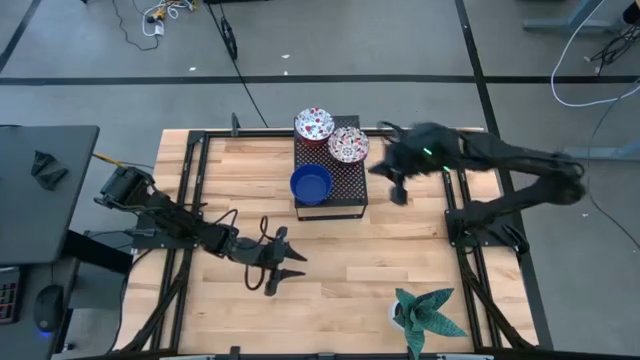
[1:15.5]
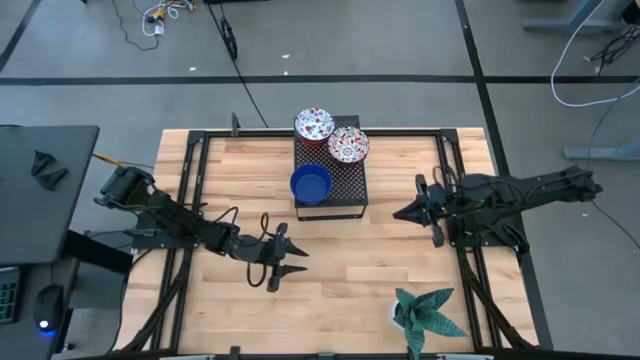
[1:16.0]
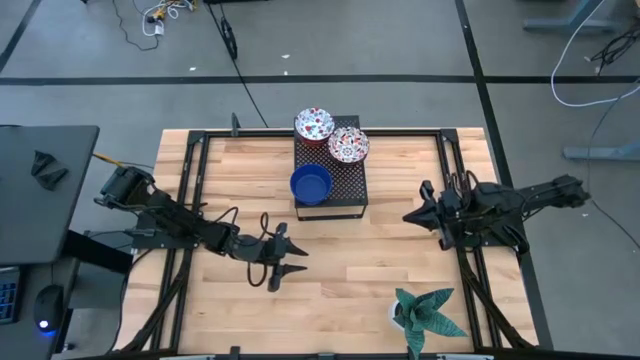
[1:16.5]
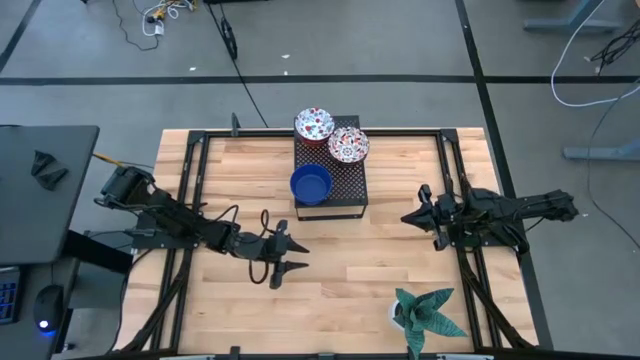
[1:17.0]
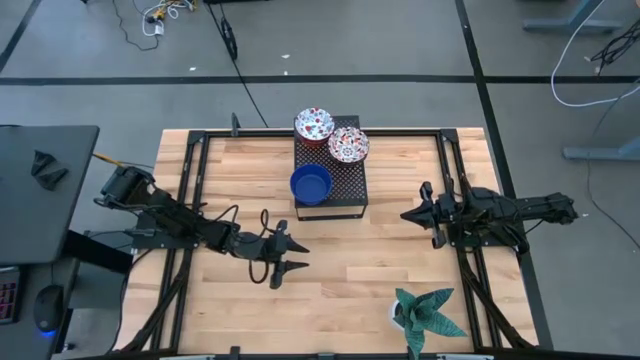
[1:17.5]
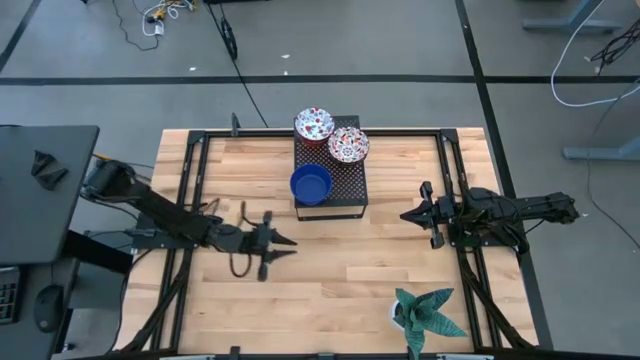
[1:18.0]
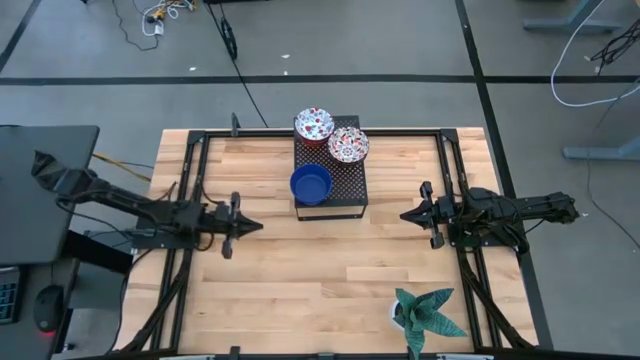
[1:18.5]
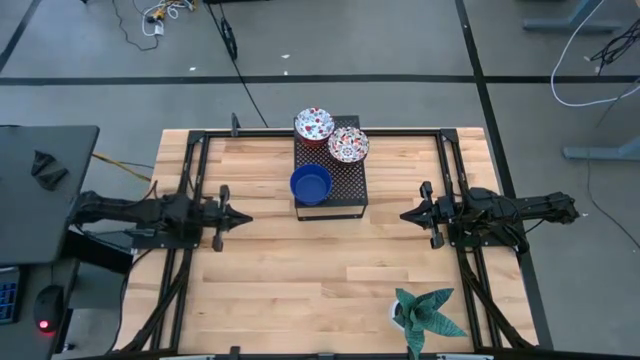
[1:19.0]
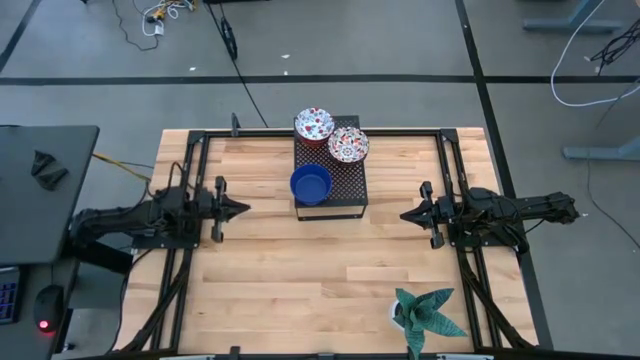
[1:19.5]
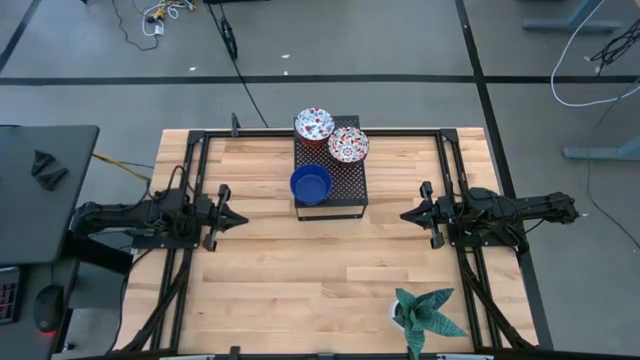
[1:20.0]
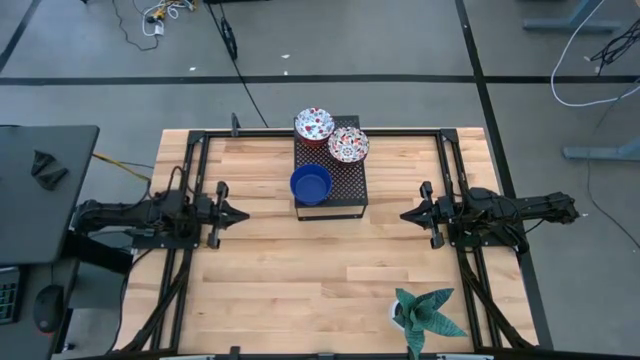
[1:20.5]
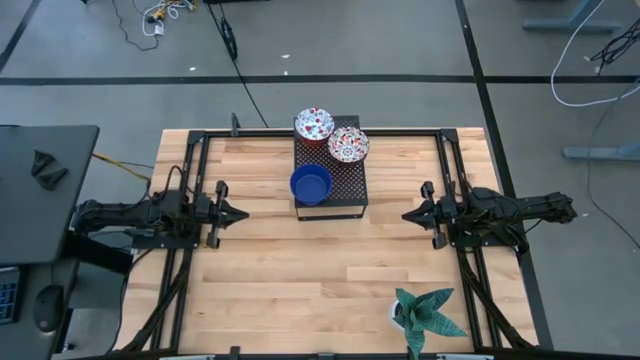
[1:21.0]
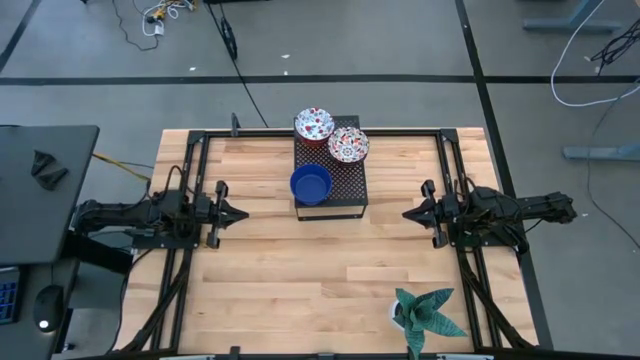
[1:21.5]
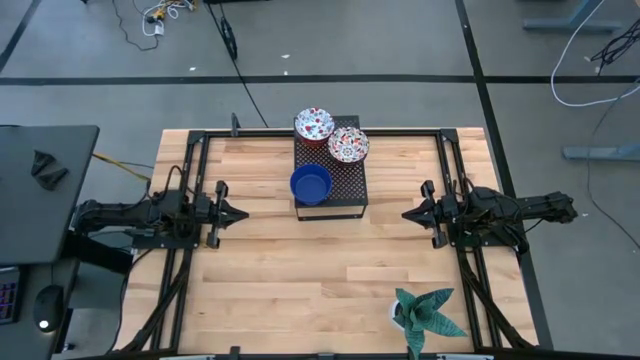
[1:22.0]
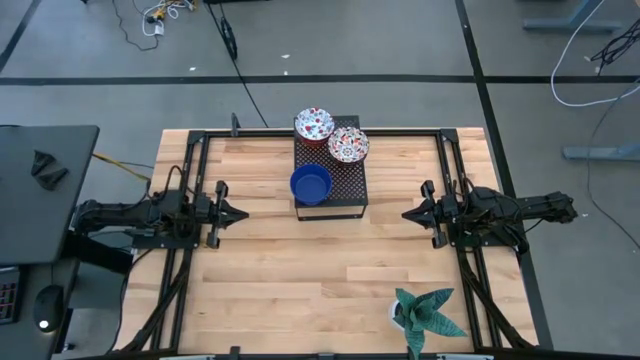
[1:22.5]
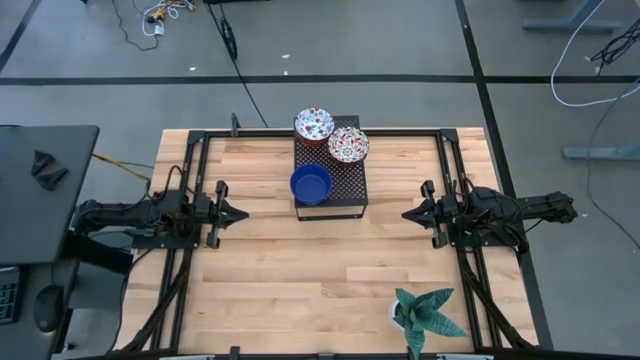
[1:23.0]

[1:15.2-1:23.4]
Task: Pick & Place Mini bowls
Return to Home Position

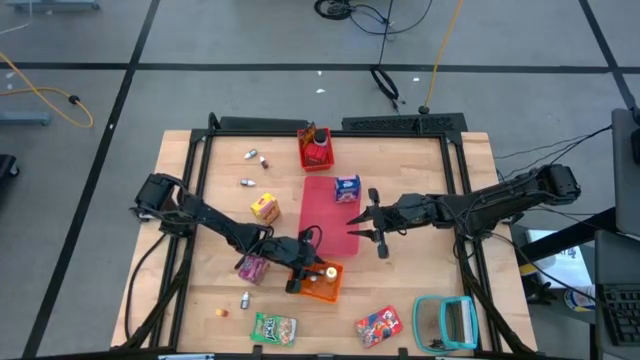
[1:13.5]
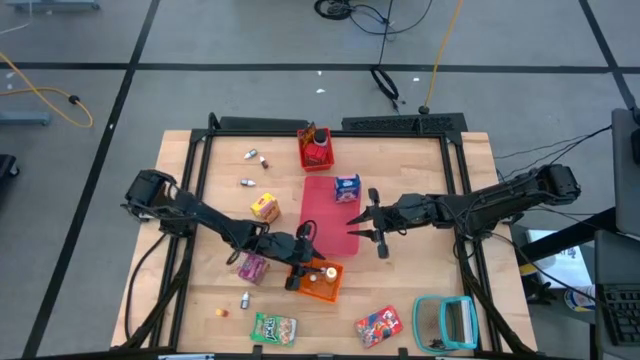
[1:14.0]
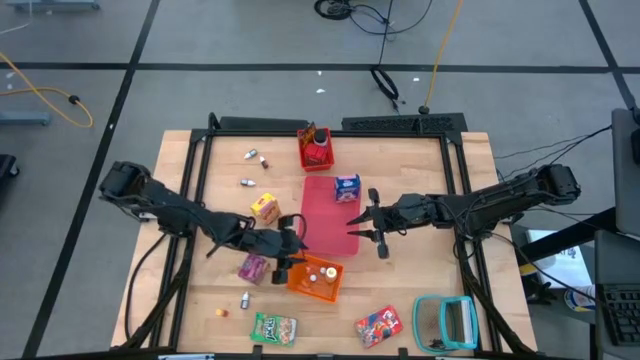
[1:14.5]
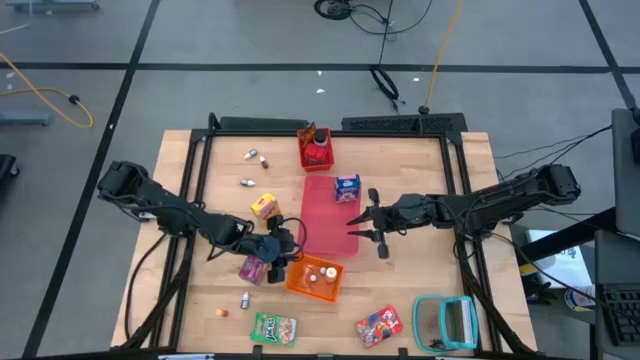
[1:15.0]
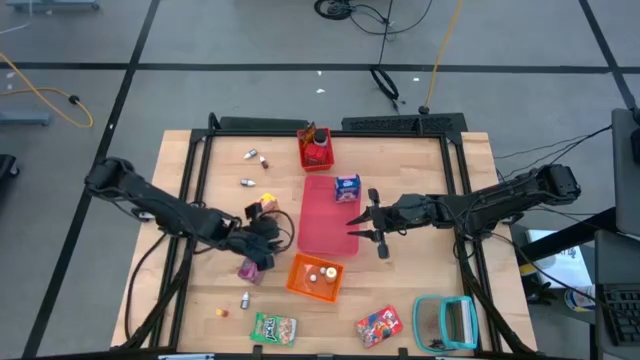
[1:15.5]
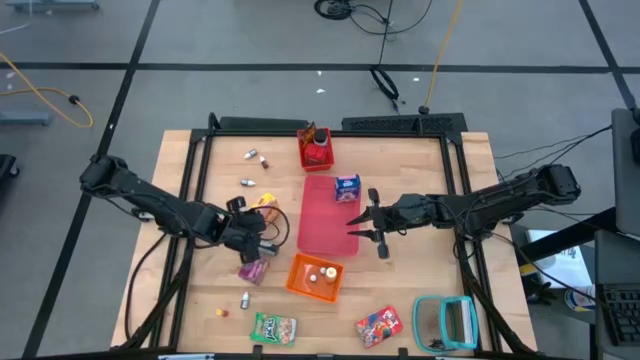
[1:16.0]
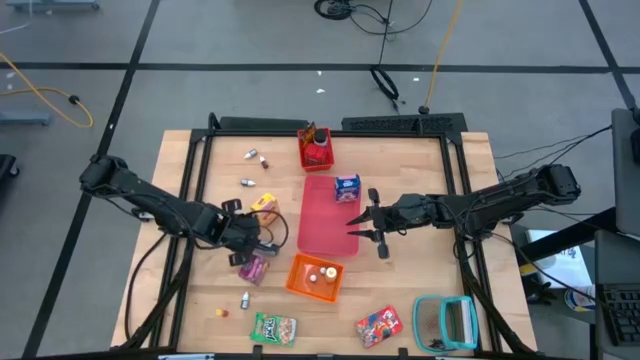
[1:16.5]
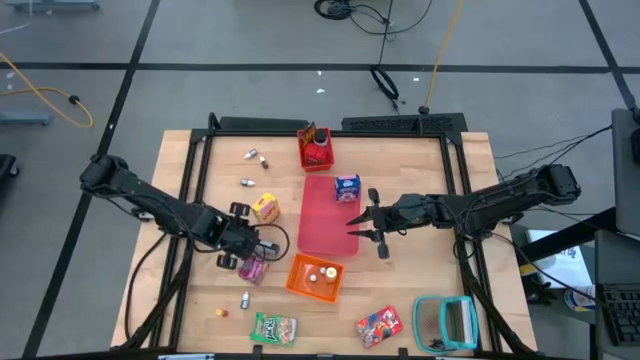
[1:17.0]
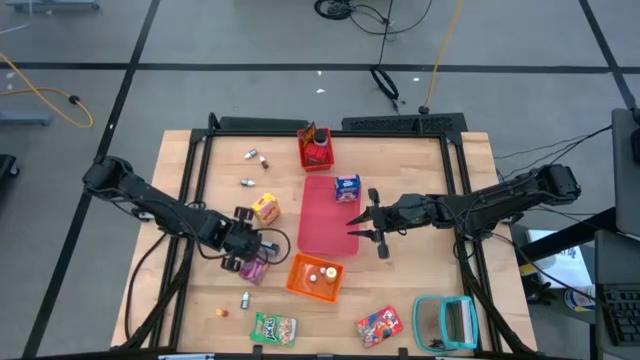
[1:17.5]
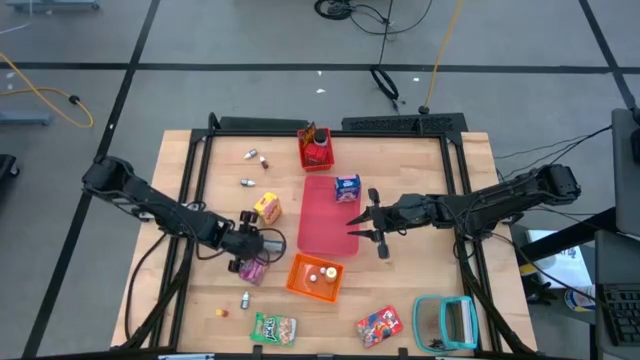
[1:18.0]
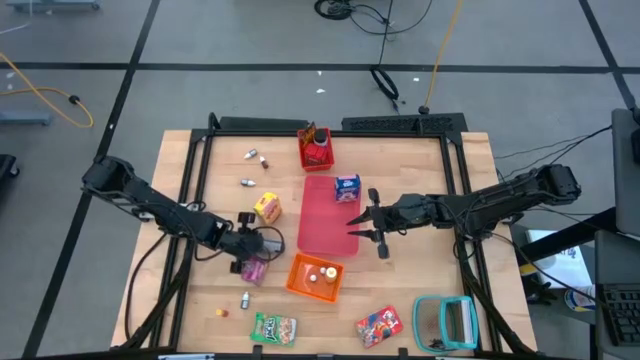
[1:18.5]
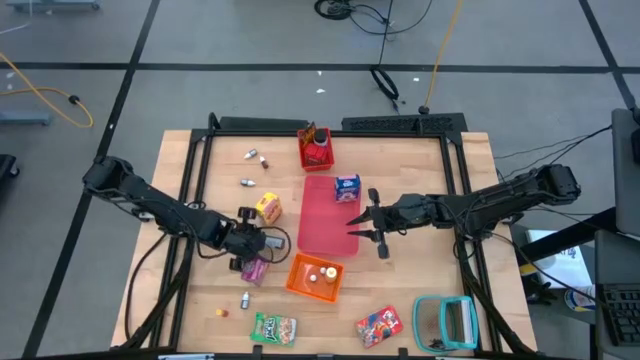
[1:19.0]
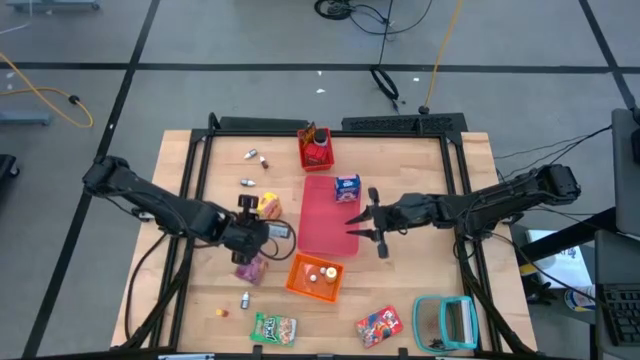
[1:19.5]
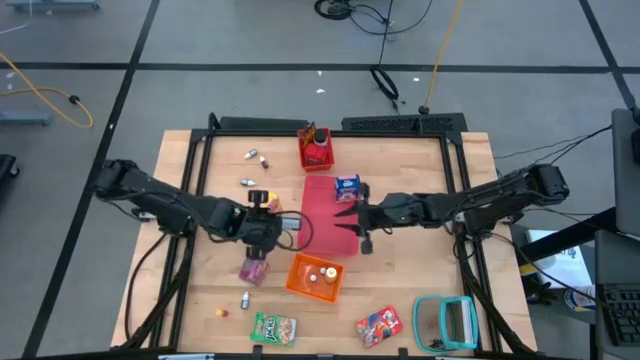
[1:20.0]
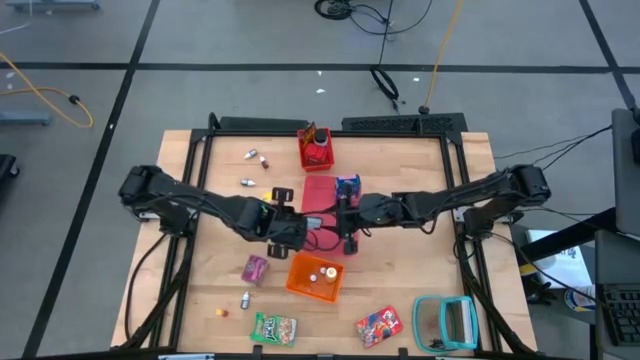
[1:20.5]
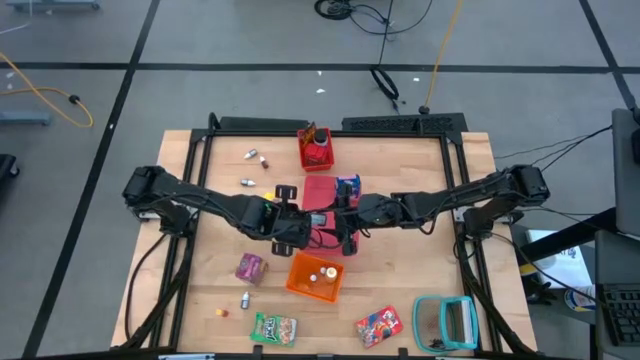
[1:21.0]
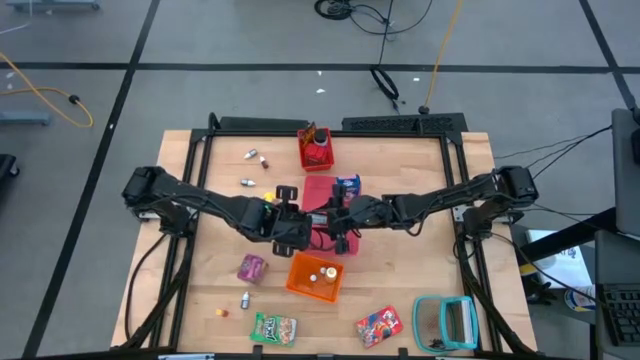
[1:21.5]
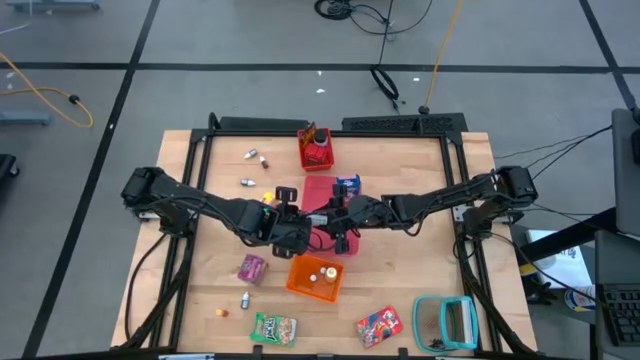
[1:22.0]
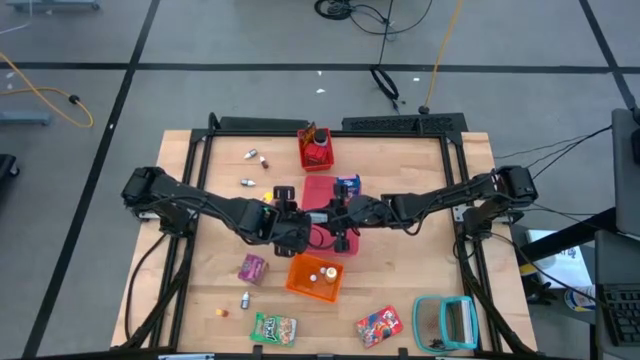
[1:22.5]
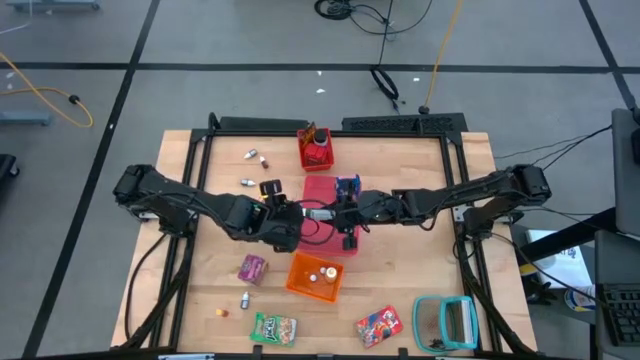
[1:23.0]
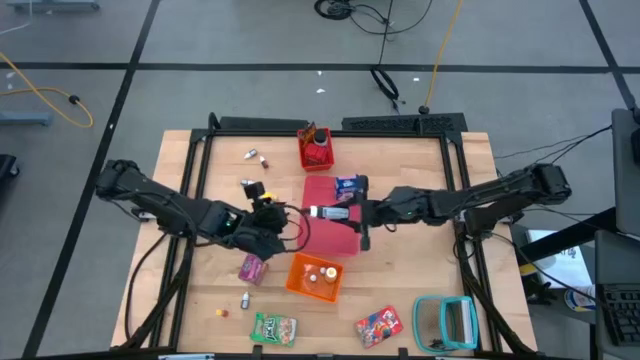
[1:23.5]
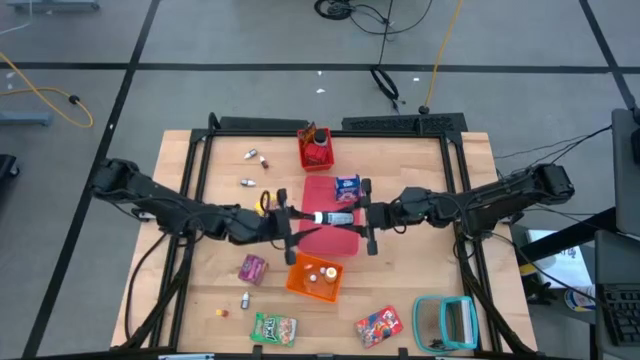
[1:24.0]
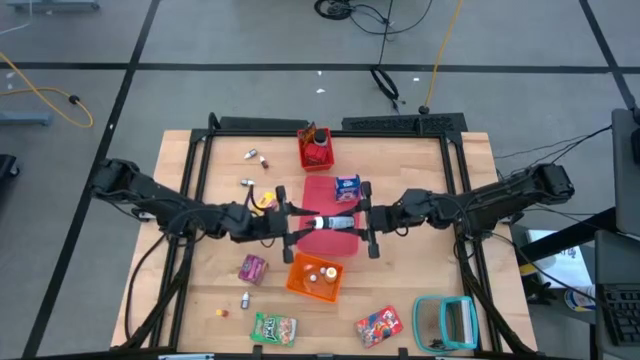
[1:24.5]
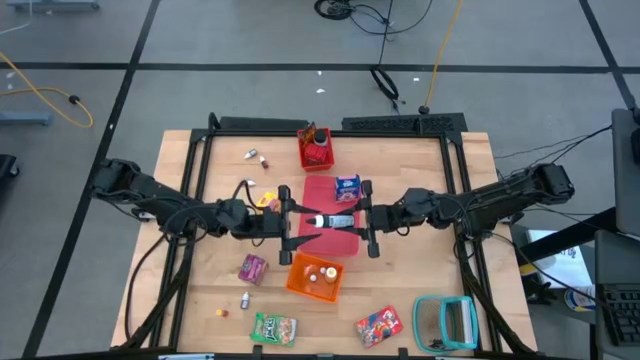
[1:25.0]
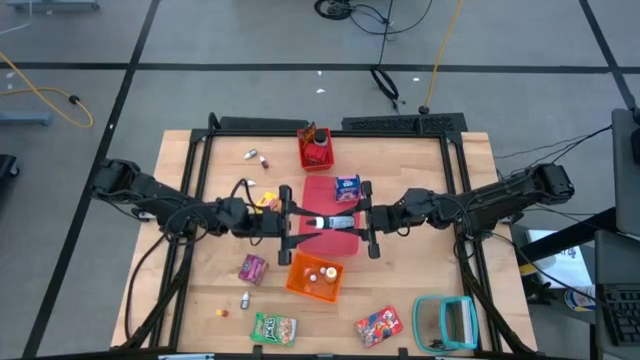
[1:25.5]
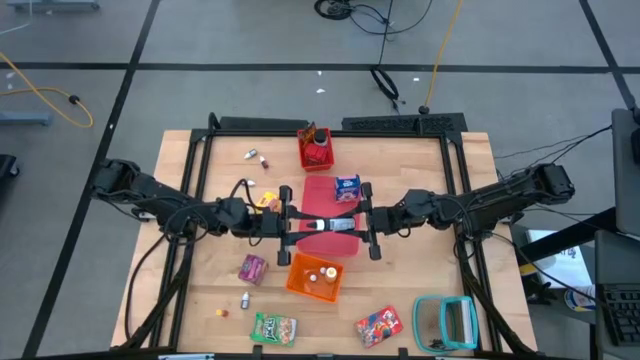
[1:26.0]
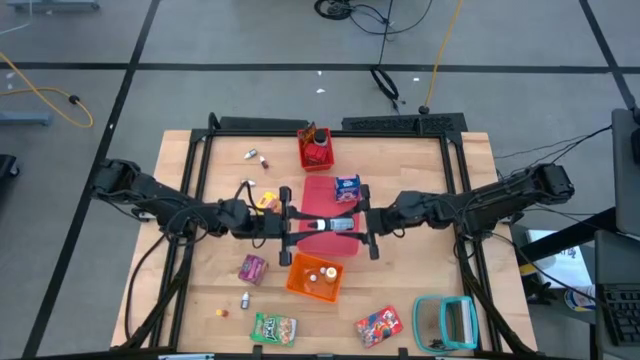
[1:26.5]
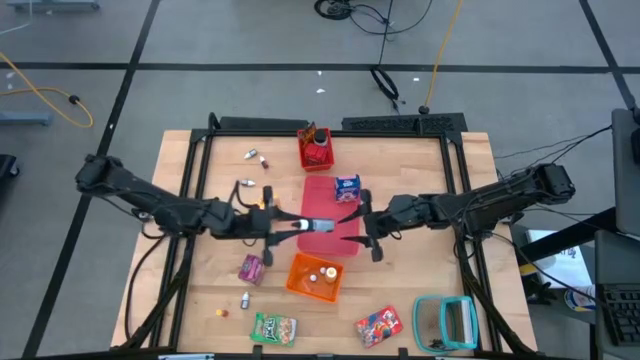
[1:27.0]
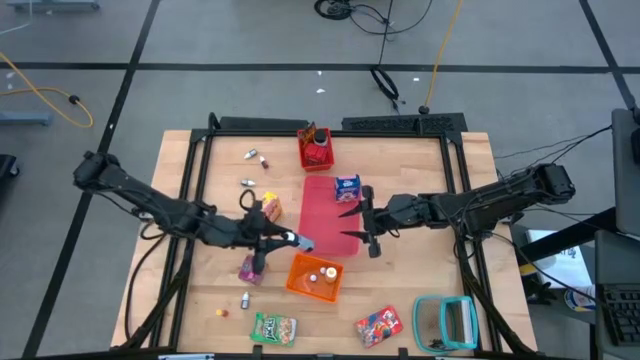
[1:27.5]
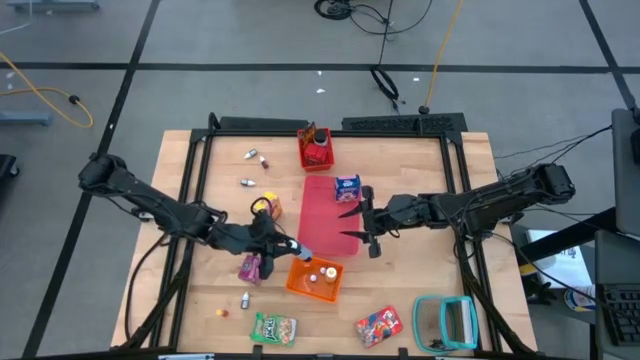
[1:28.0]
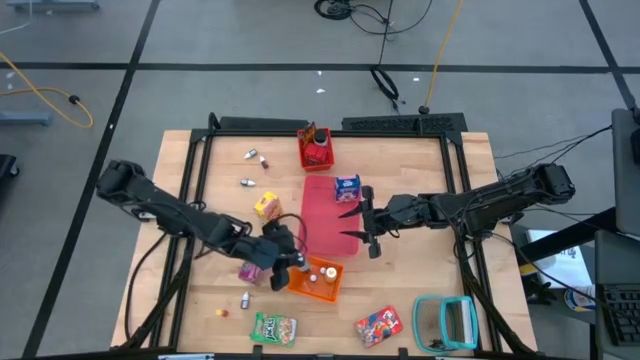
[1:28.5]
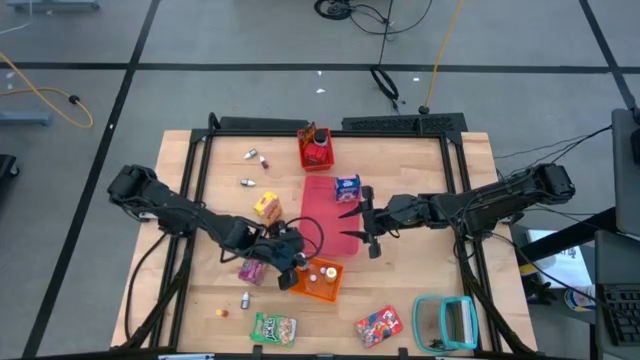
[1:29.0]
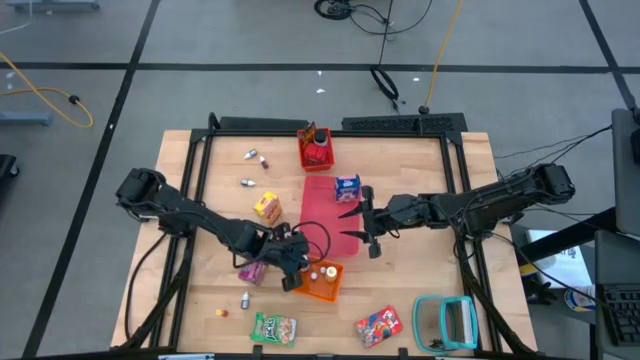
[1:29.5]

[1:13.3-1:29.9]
Task: Pick & Place Kitchen Items
Put the big black food coloring bottle into the orange bin
